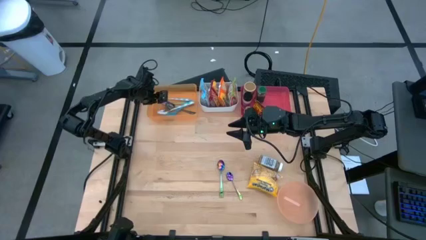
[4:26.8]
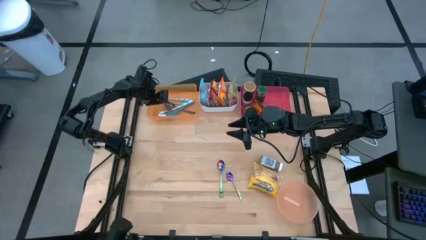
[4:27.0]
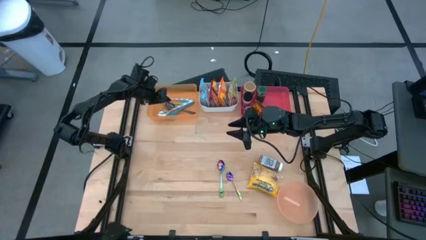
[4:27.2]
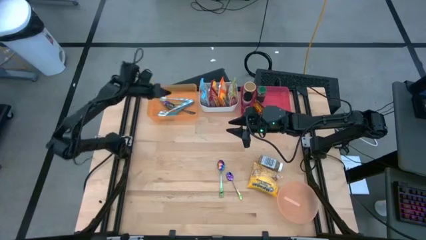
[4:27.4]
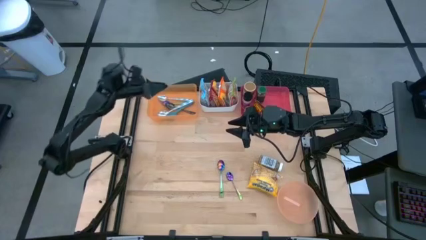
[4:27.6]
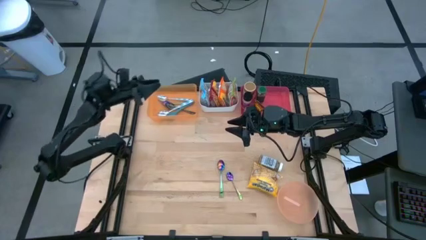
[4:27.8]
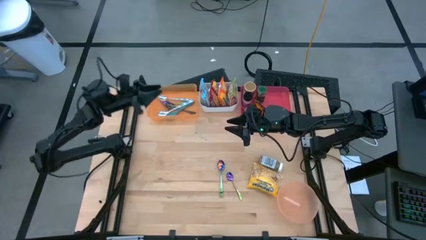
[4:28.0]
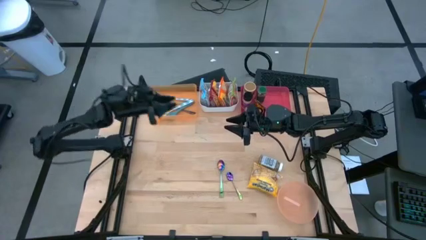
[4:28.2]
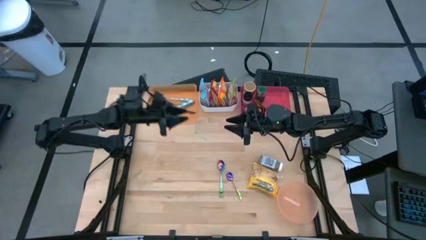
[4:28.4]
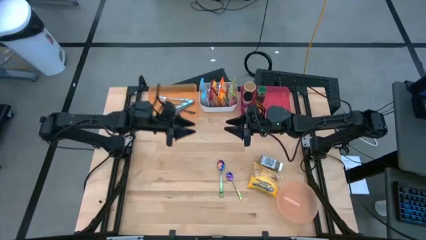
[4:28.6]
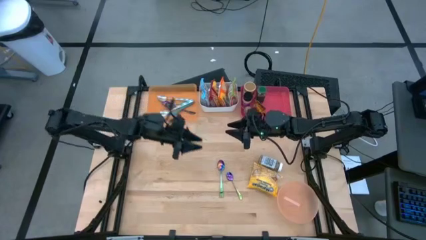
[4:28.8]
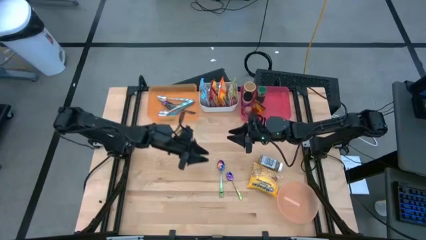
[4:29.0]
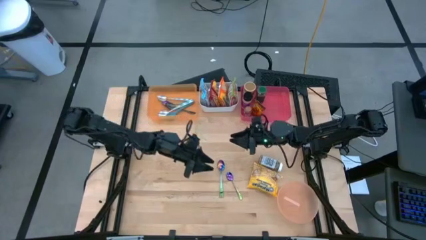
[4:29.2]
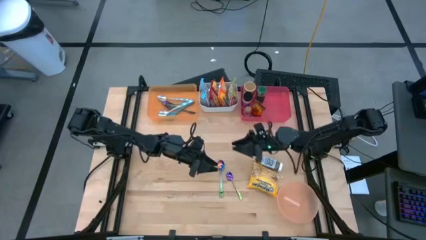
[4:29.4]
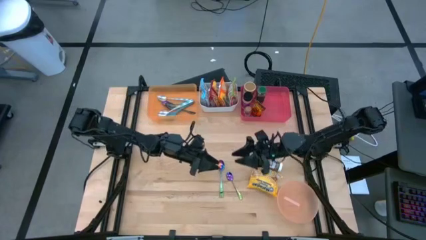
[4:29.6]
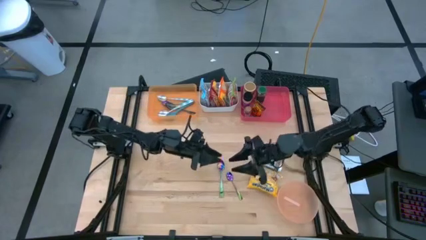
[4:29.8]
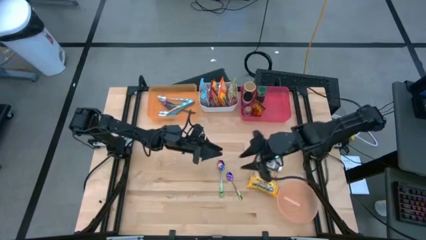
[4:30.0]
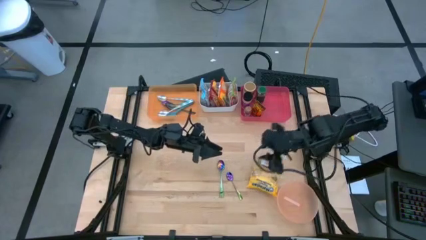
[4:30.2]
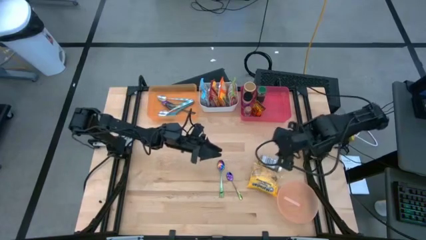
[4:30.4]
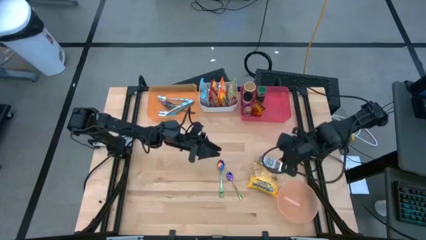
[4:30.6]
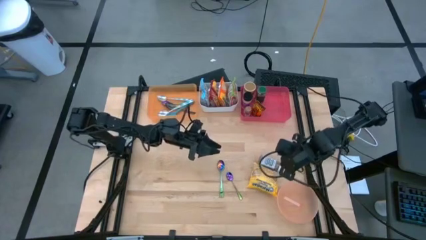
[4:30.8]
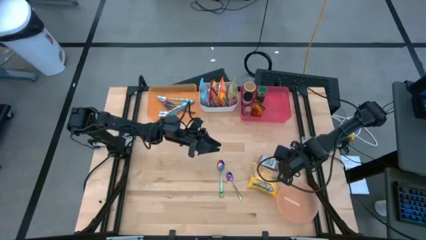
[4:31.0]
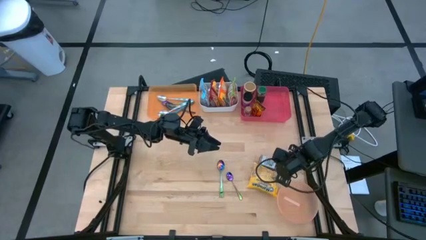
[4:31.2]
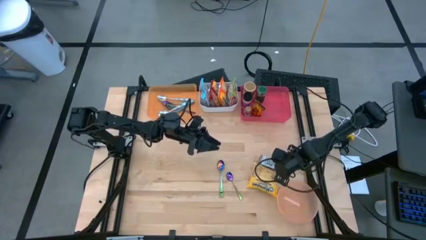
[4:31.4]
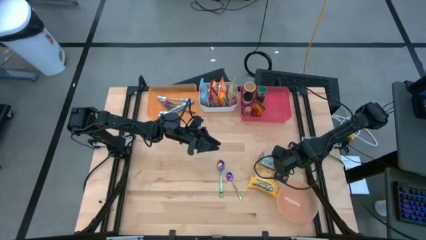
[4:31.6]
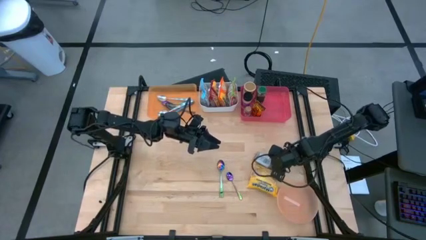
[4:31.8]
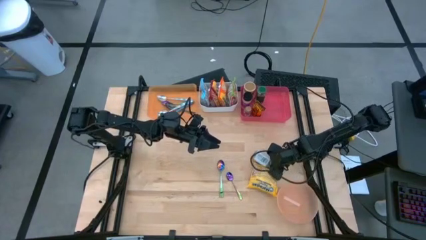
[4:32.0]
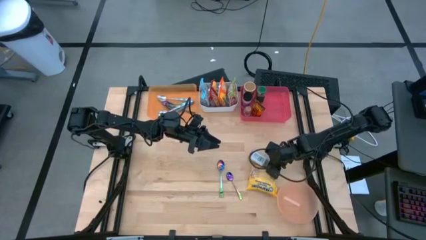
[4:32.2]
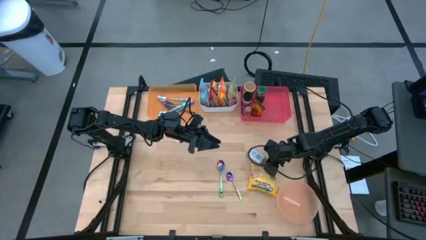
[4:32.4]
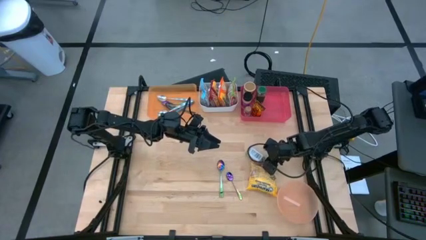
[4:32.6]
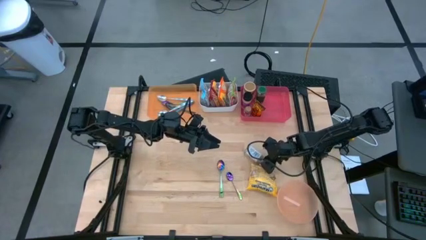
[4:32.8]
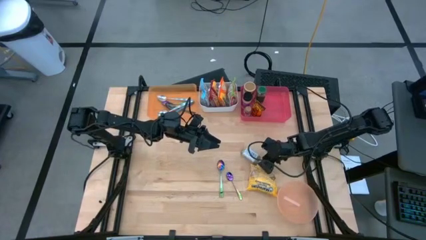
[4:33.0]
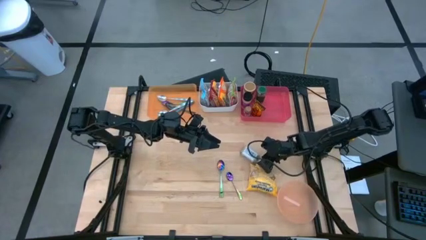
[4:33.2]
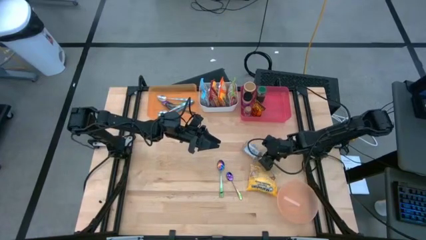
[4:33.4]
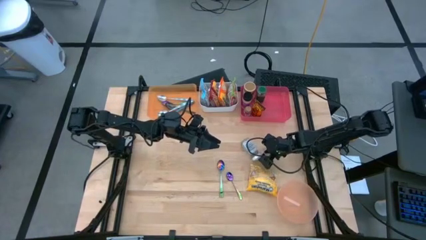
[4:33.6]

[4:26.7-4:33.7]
Task: Pick & Place Food Item
Put the white spice bottle into the red bin

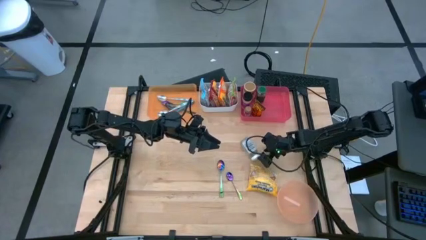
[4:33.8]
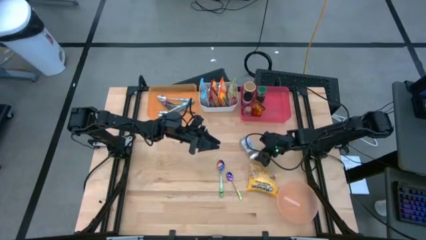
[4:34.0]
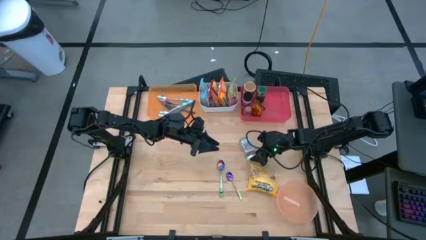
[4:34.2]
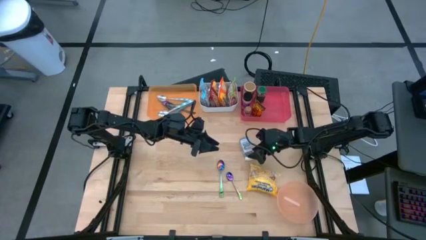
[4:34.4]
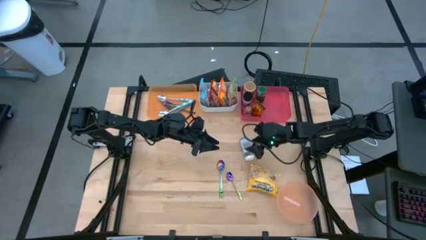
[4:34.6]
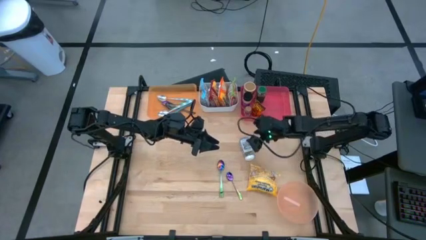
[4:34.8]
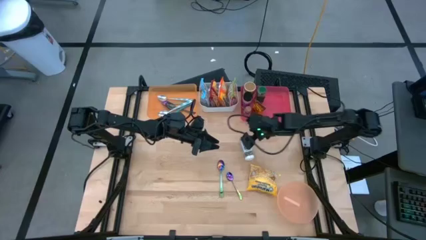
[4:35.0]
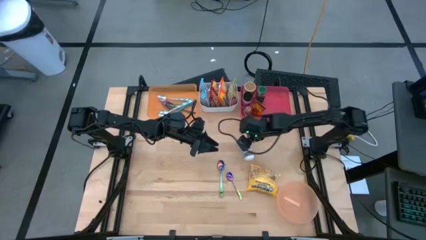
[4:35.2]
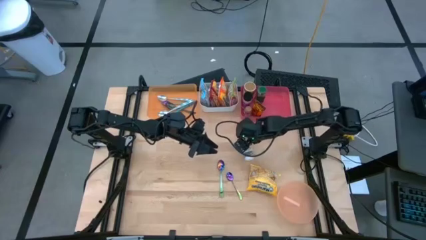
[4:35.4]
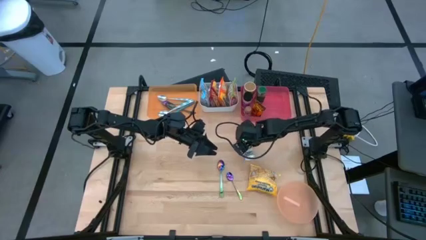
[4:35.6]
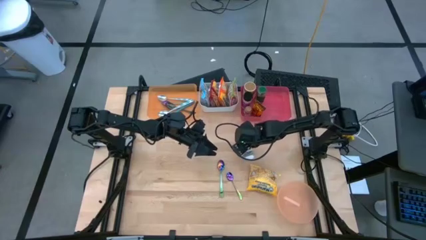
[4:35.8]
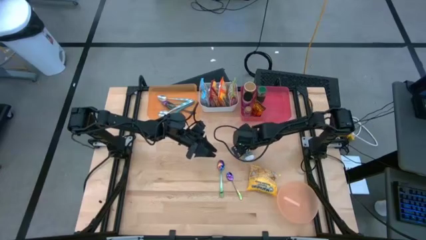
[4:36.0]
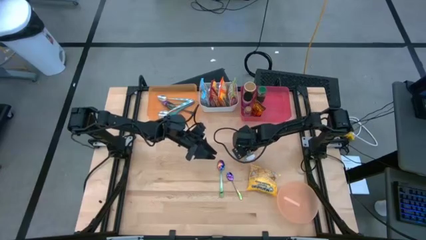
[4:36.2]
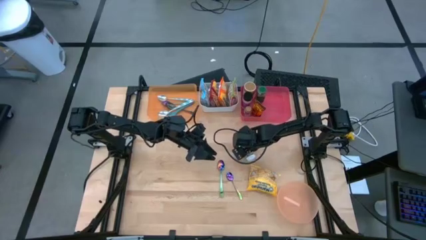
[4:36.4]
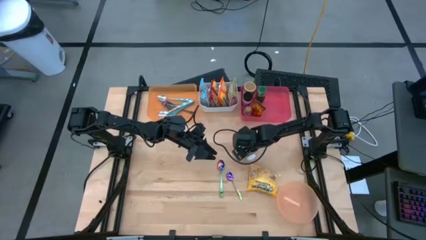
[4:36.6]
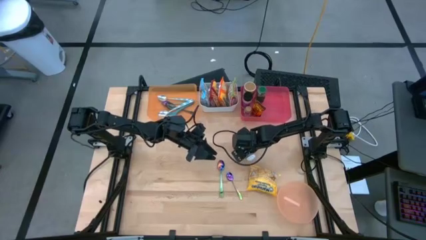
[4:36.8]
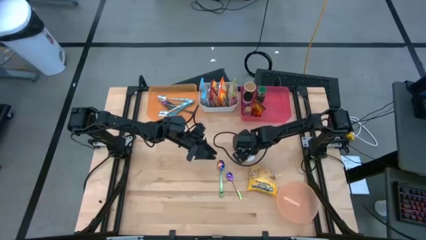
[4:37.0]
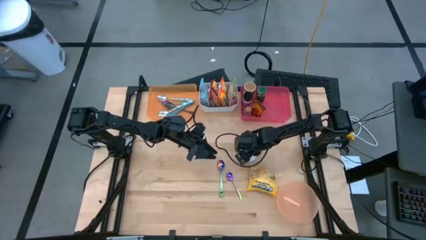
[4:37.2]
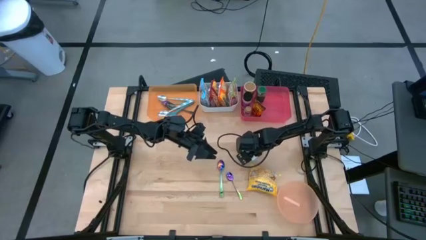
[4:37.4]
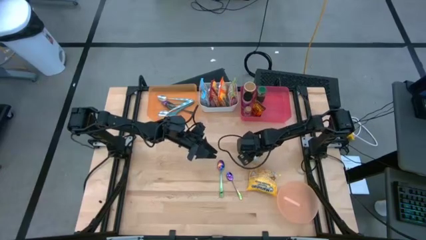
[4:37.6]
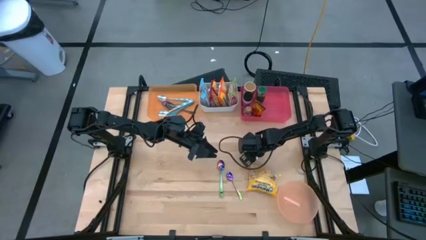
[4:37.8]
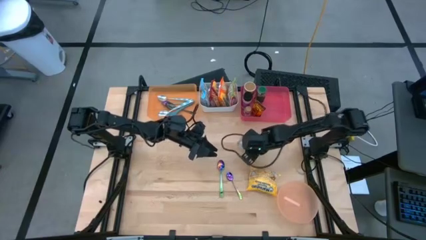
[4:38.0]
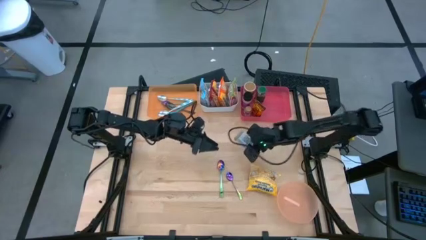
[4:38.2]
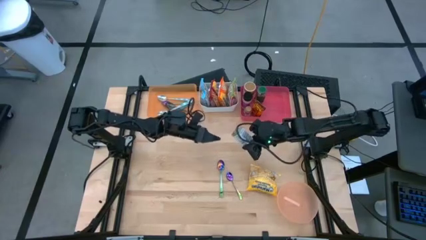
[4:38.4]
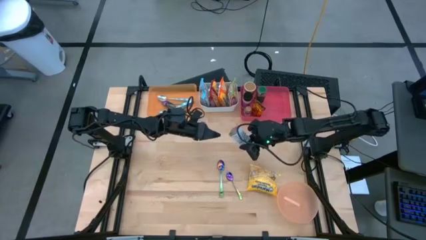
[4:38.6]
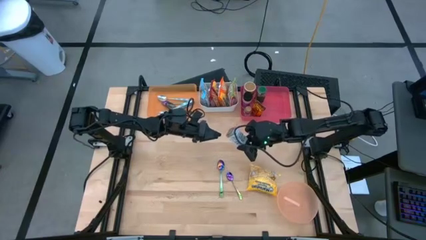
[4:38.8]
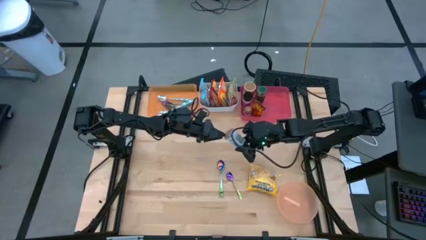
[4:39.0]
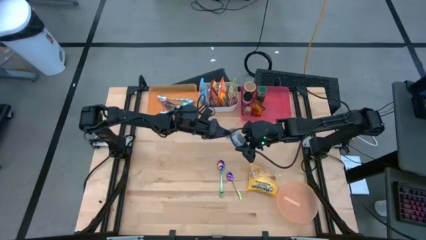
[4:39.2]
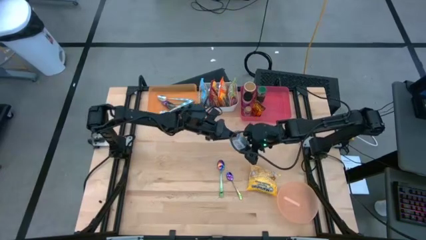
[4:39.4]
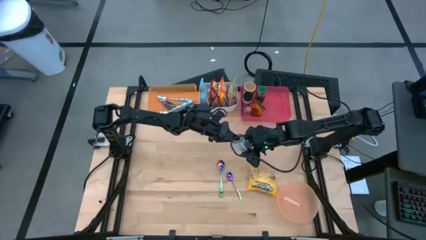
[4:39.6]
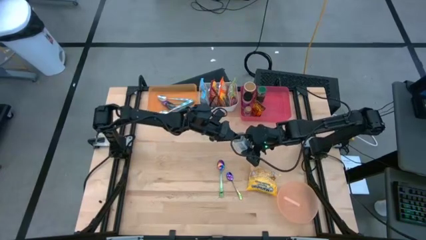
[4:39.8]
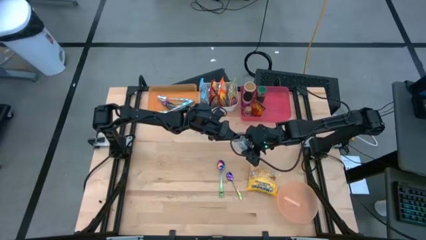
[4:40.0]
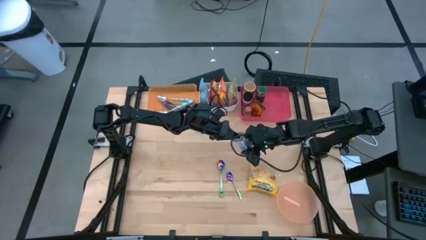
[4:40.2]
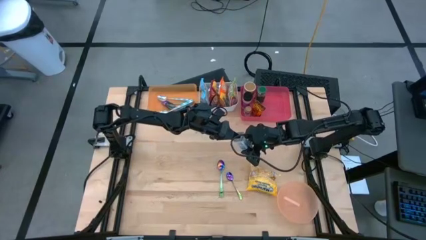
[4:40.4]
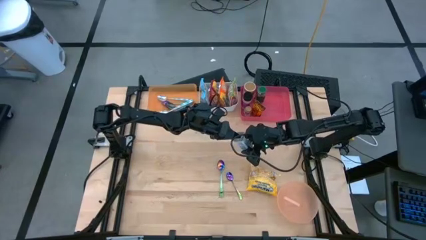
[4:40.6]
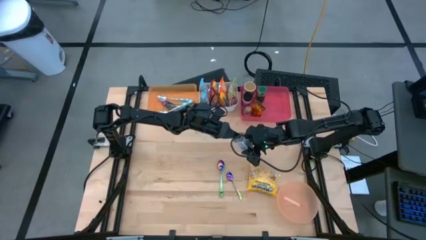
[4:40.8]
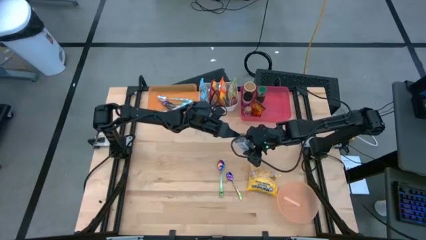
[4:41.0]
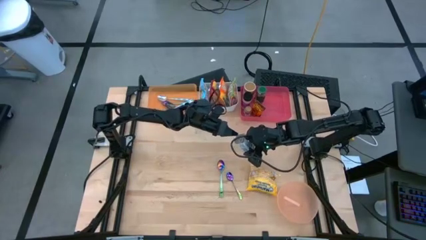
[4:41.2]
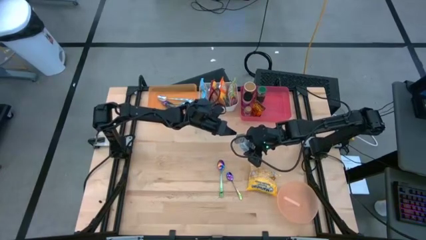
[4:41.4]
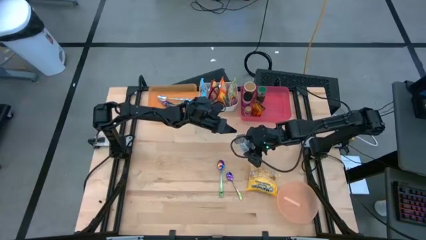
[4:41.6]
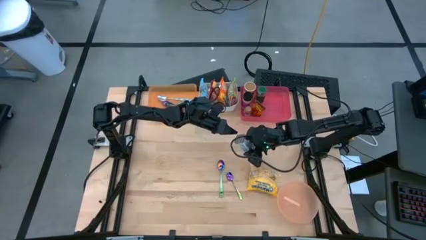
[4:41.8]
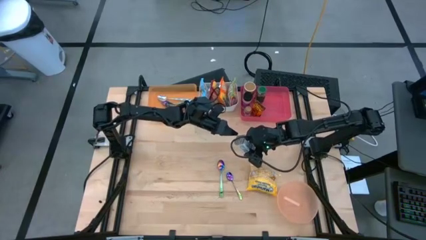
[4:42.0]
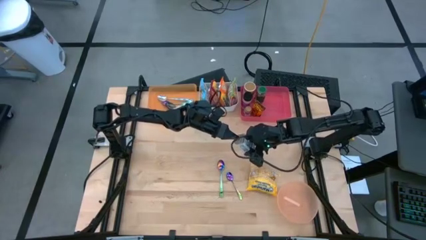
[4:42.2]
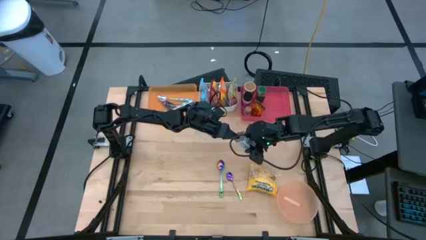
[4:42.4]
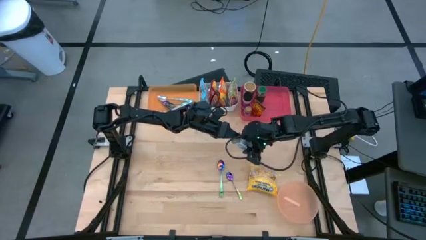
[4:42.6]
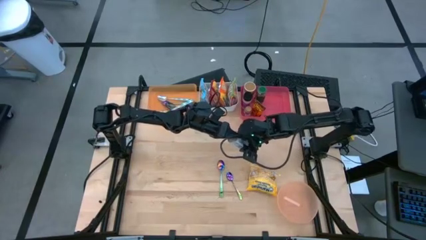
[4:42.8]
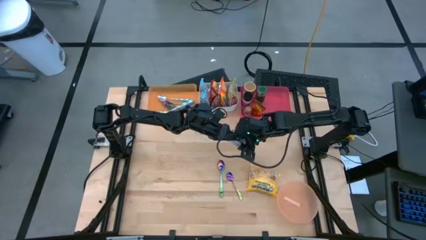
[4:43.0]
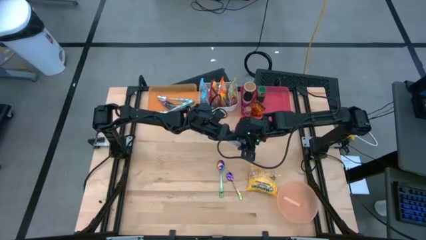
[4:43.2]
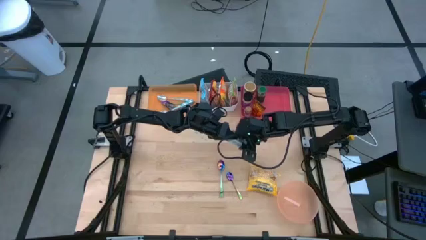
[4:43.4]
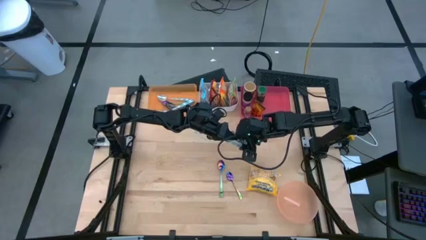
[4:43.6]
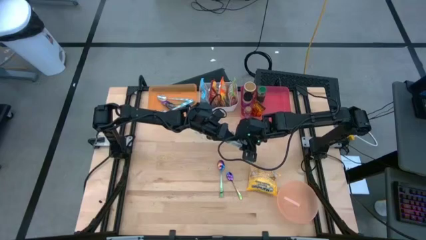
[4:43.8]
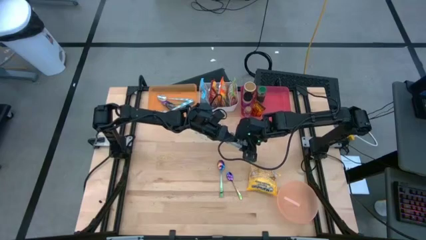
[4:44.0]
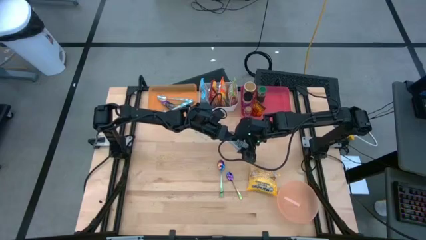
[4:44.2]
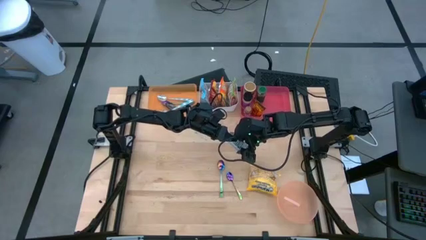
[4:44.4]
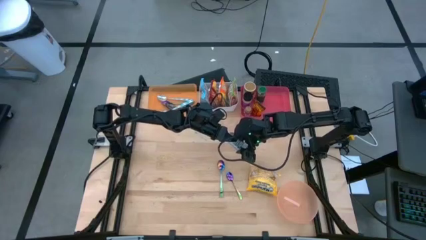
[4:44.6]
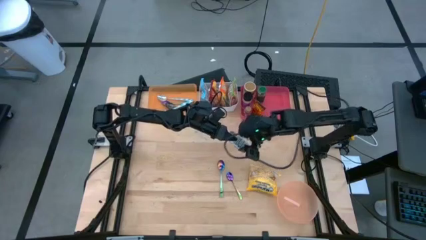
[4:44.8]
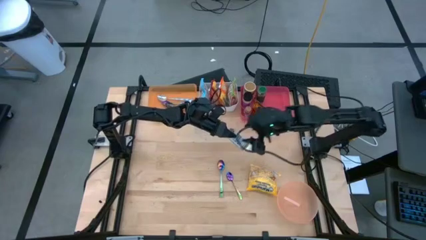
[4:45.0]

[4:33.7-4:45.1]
Put the white spice bottle into the red bin
